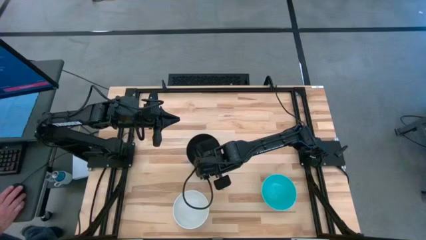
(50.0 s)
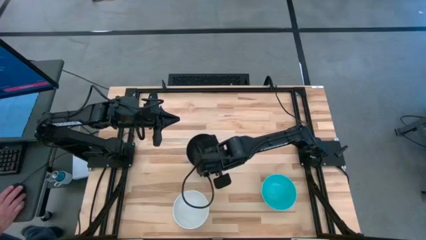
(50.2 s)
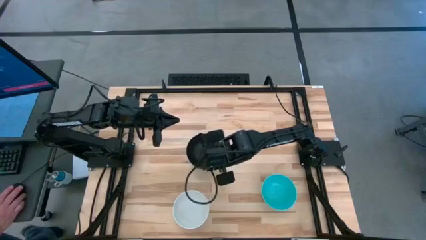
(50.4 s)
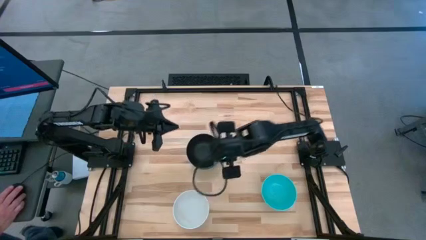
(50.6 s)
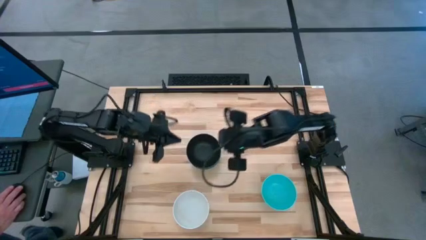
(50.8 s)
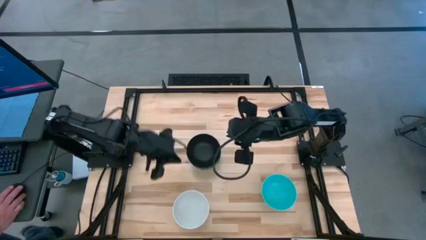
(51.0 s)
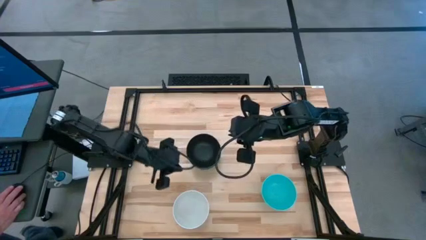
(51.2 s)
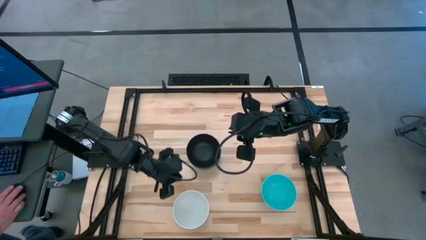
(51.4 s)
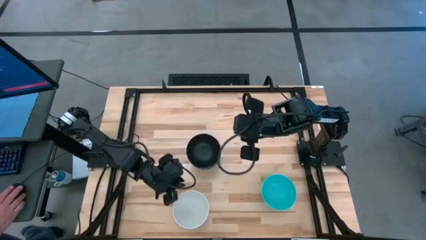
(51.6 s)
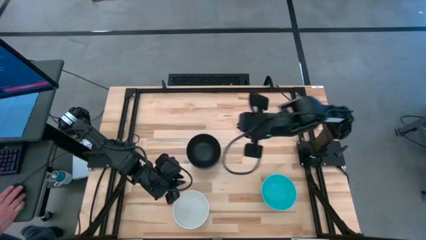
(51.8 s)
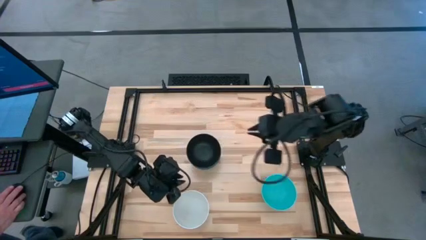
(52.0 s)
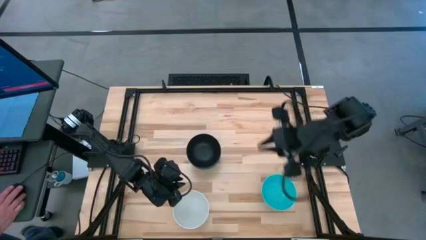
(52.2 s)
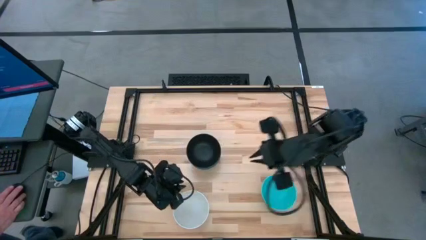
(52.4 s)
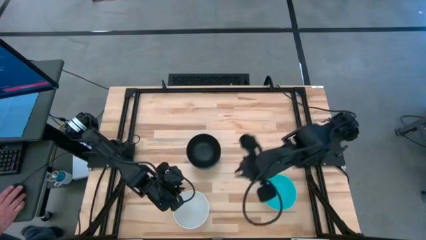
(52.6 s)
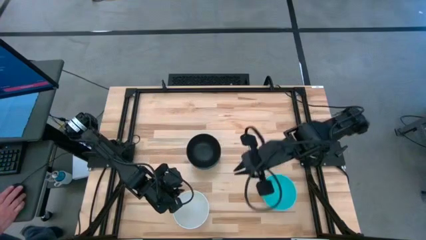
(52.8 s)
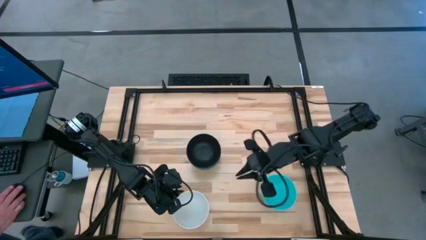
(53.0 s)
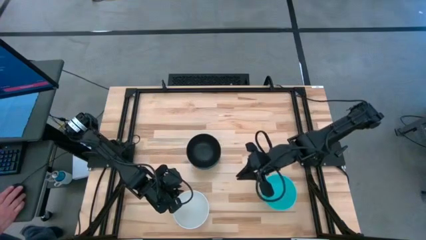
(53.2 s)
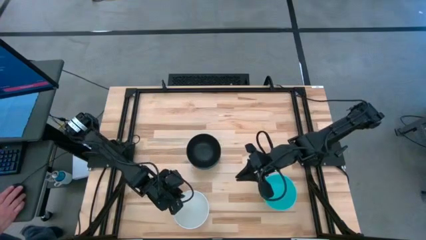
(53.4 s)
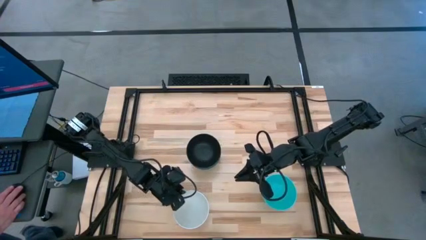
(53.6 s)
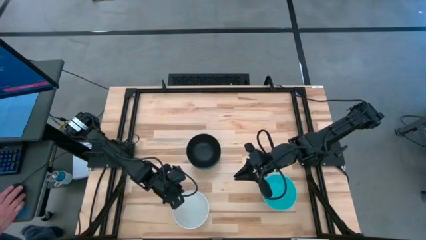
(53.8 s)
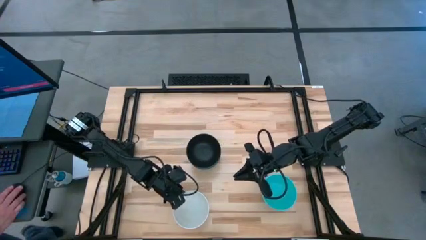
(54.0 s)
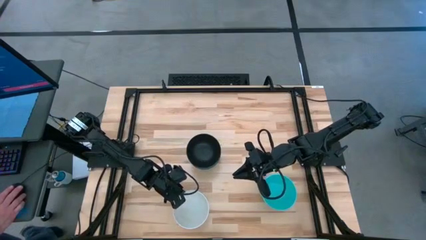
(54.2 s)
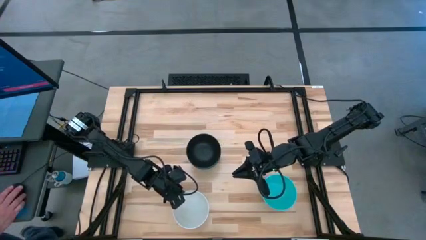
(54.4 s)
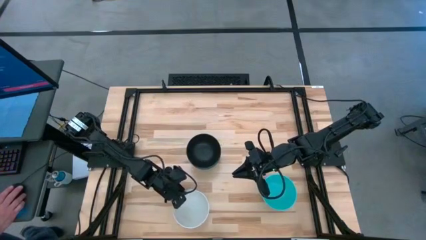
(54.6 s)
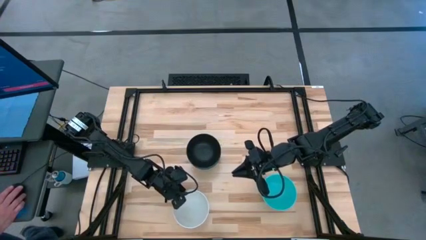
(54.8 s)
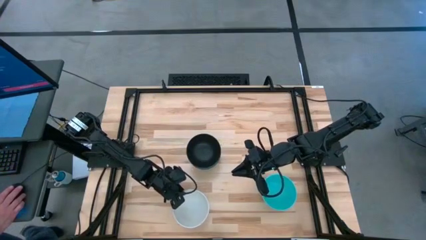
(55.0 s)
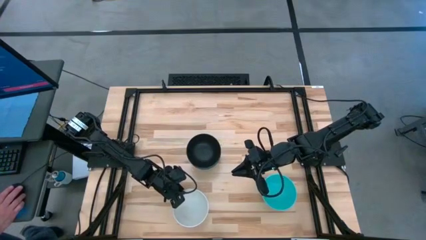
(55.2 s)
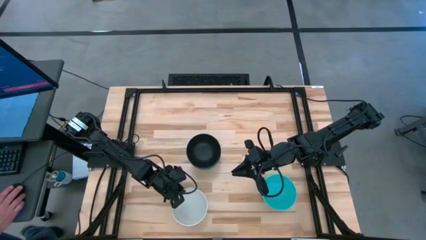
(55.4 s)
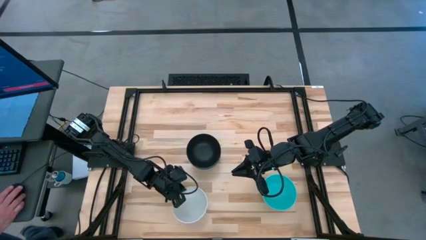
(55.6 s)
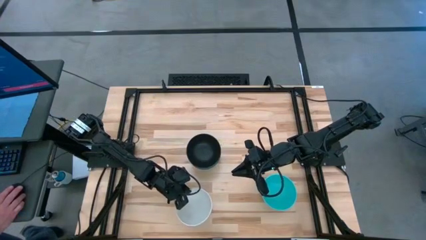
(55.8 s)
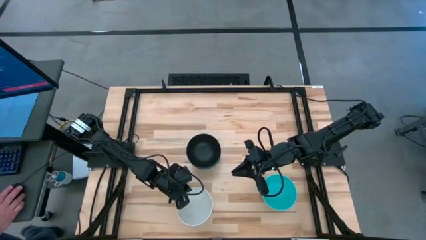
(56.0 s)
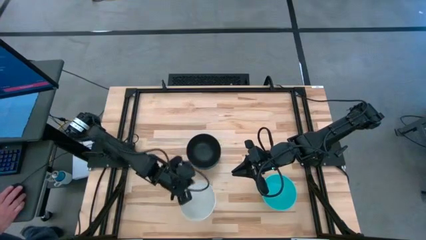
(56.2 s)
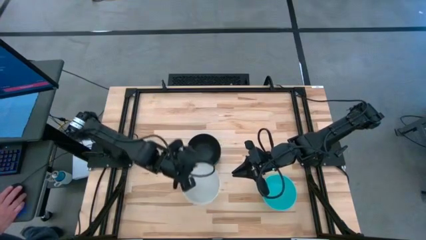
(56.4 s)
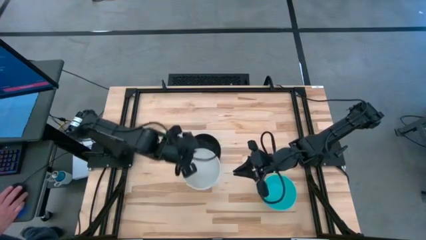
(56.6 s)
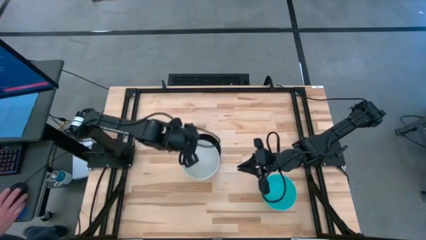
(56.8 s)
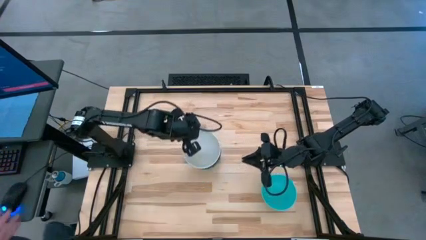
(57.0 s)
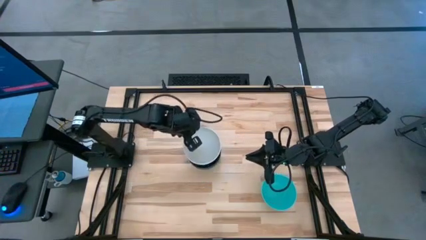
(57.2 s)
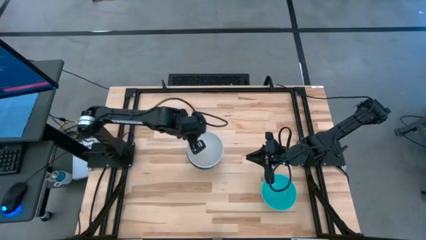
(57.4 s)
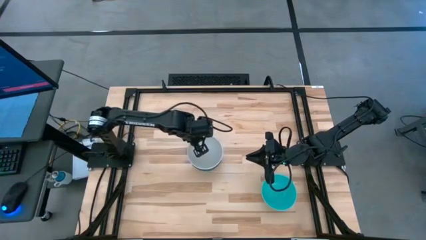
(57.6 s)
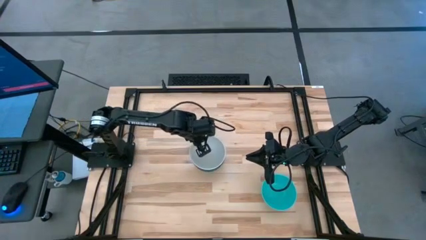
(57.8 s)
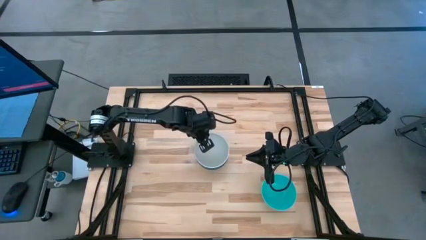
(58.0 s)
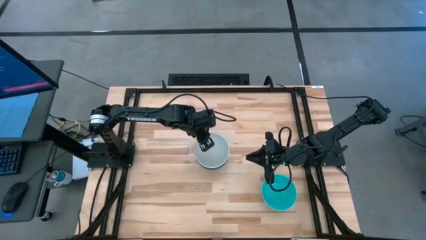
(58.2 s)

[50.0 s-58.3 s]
Task: Nest bowls inside each other
Stack the white bowl on the black bowl

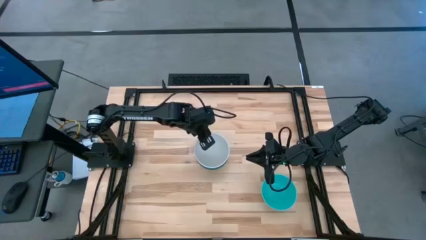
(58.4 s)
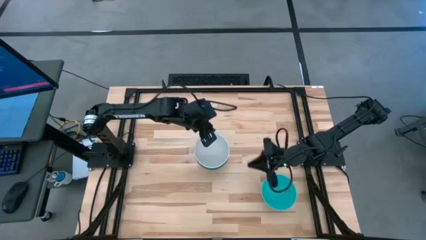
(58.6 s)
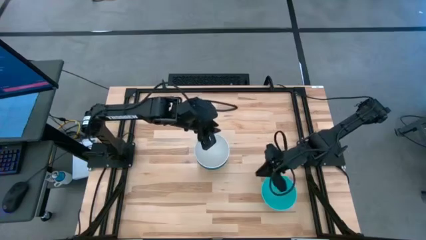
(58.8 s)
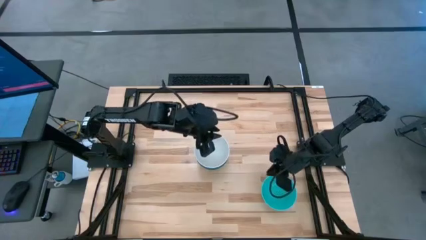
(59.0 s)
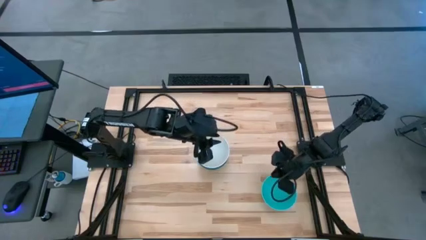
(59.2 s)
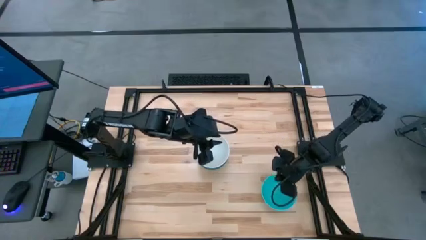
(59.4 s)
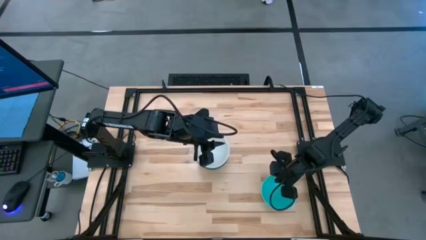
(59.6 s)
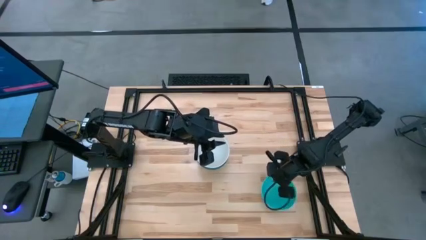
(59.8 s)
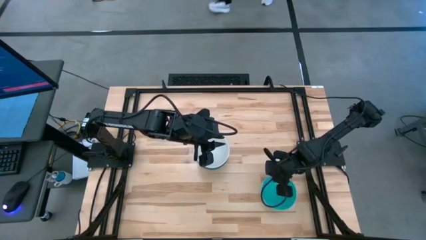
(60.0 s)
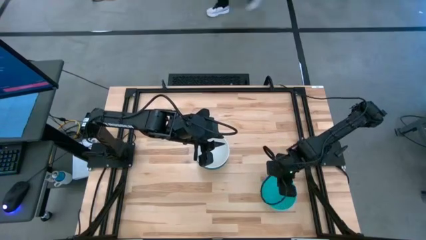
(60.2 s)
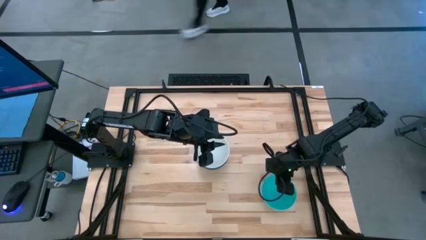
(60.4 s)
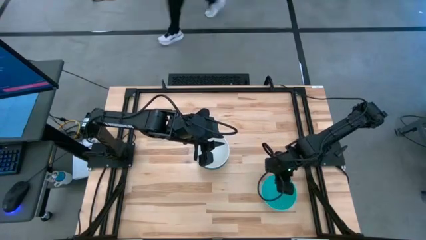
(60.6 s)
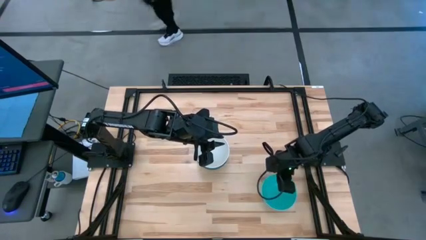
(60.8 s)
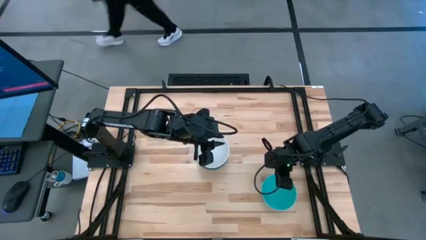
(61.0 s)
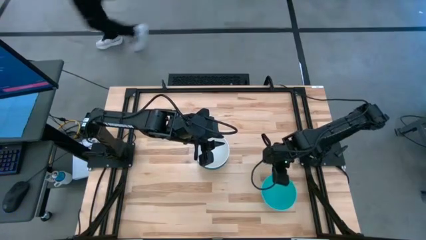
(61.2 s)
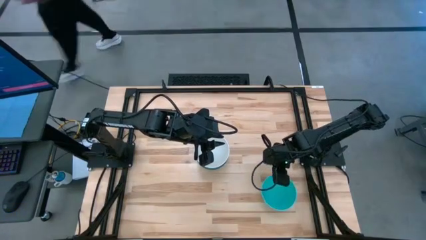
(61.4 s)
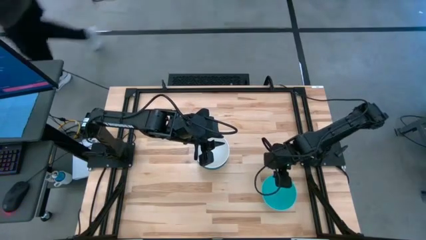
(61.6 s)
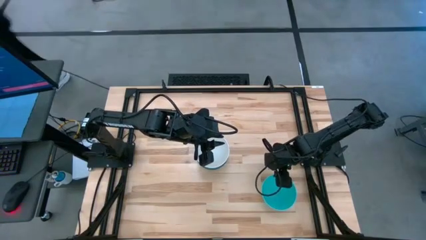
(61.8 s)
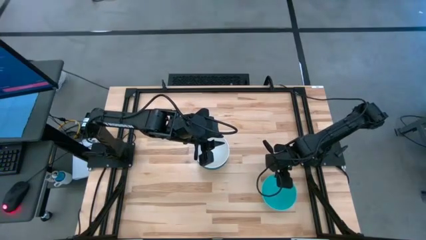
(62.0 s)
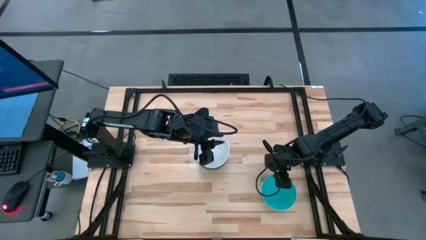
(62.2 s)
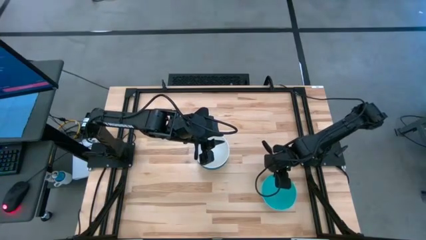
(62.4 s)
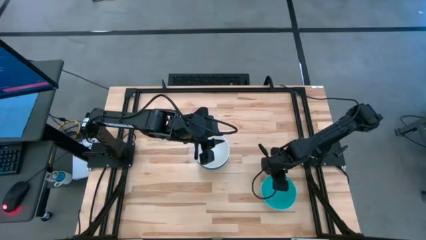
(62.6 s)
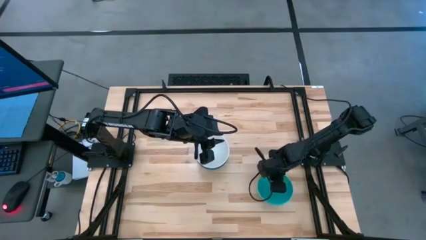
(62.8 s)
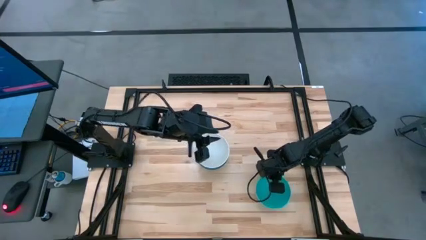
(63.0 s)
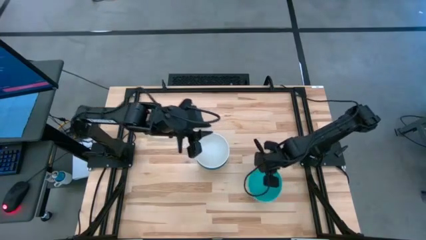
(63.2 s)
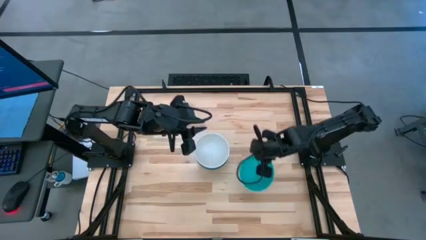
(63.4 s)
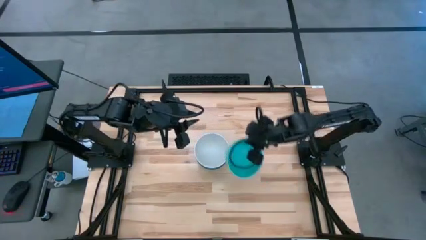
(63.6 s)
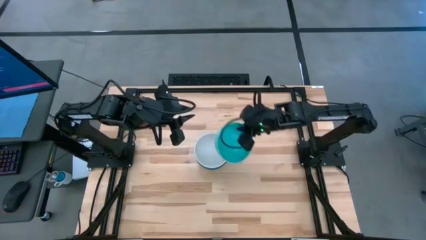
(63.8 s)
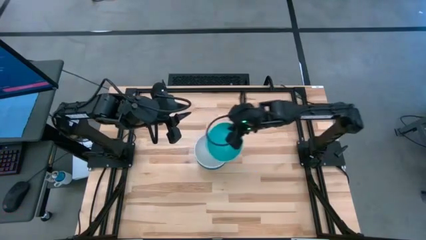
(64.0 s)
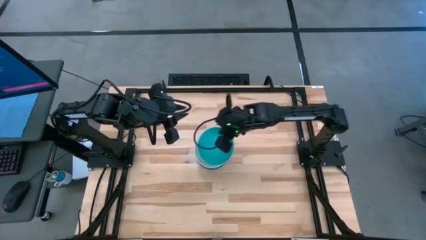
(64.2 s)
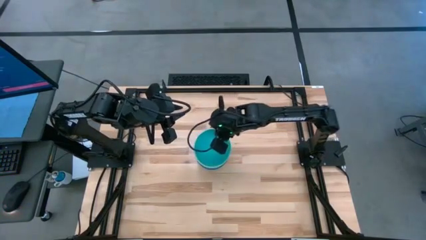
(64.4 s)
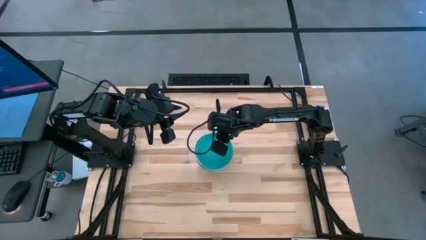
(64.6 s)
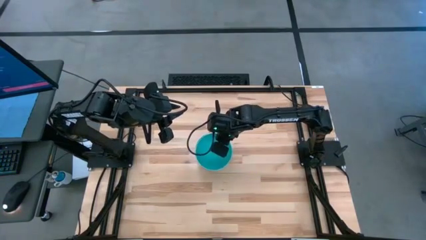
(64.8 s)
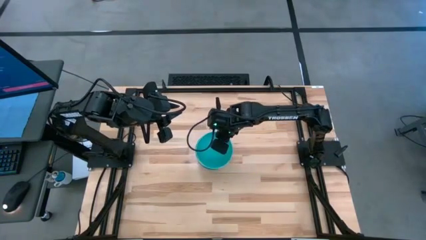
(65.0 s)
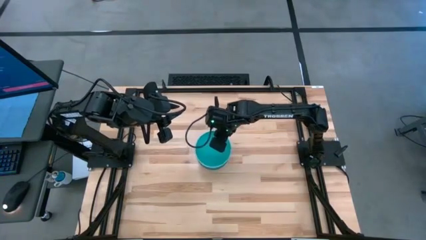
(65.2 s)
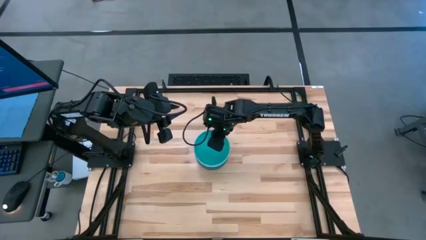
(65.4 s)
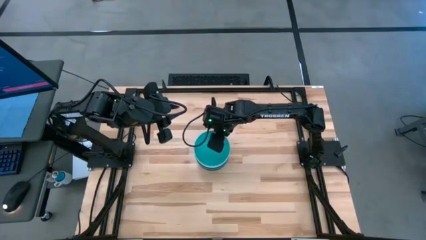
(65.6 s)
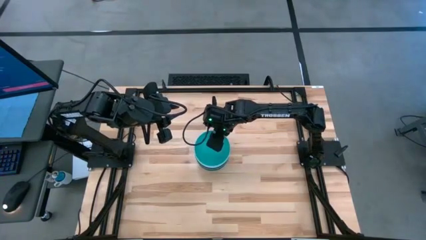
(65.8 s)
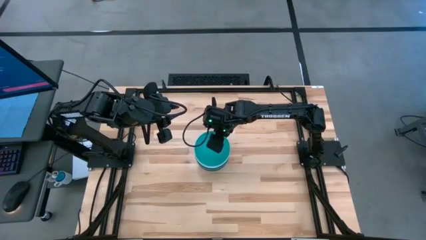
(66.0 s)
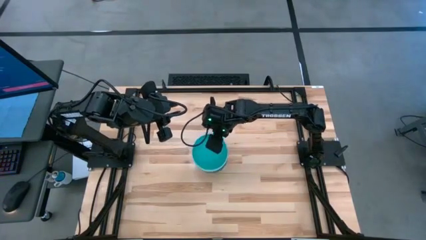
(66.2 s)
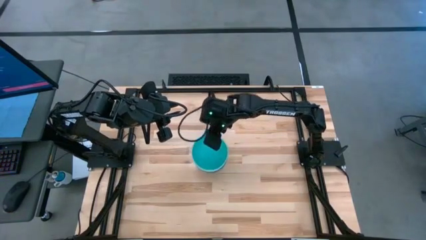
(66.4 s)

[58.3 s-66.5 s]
Stack the light green bowl on the white bowl
